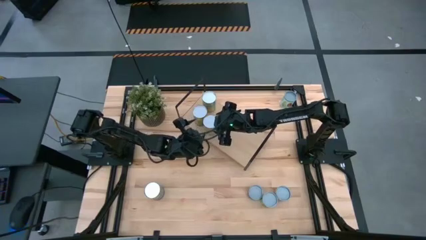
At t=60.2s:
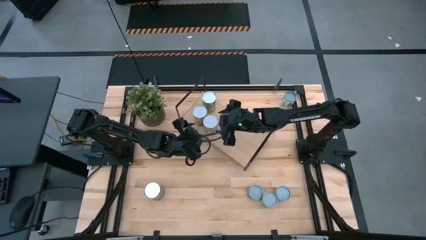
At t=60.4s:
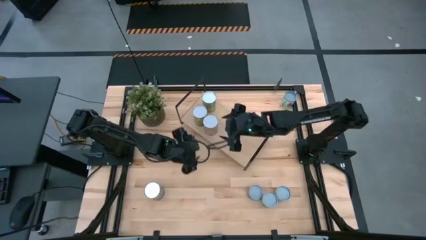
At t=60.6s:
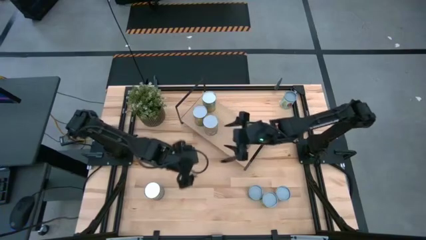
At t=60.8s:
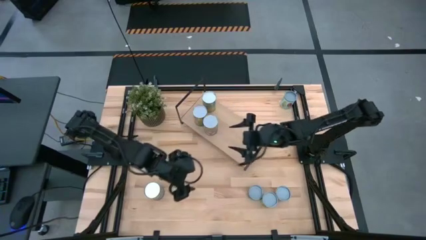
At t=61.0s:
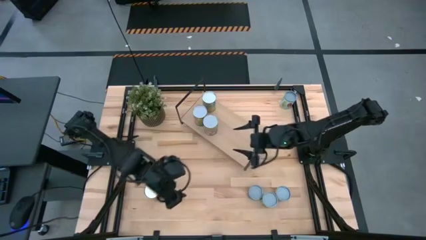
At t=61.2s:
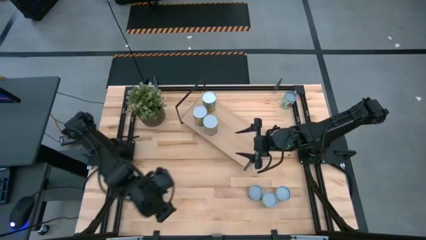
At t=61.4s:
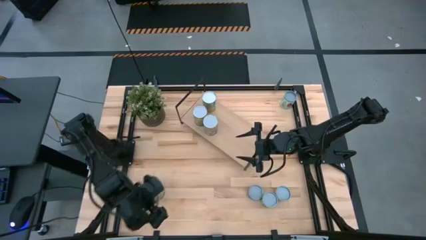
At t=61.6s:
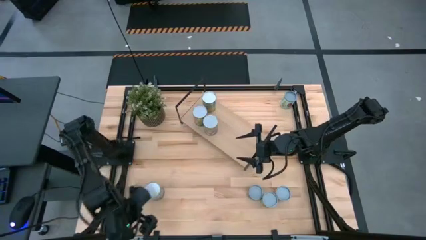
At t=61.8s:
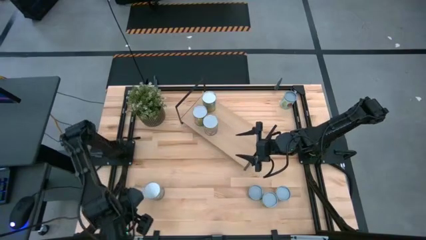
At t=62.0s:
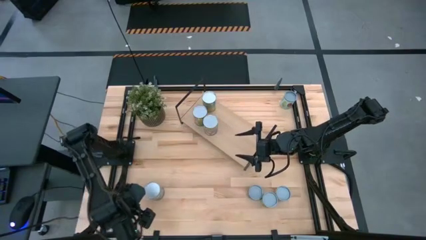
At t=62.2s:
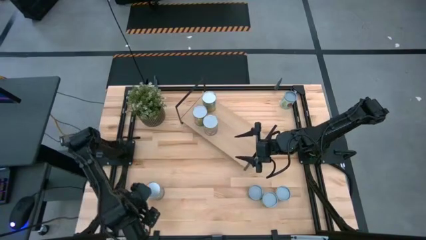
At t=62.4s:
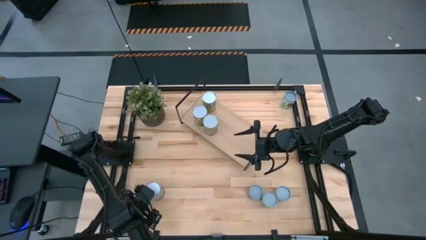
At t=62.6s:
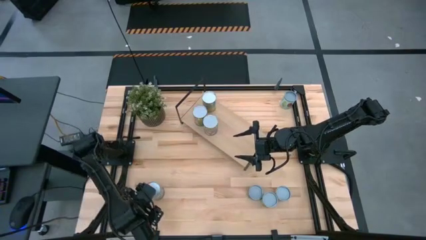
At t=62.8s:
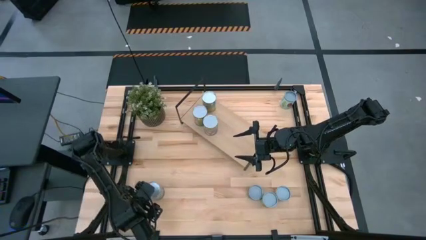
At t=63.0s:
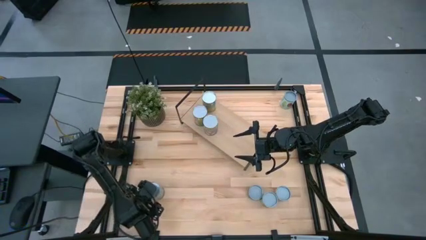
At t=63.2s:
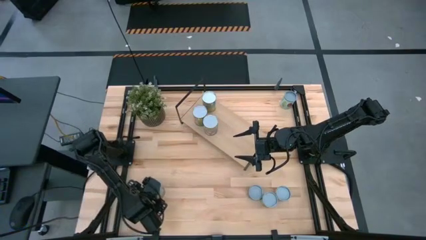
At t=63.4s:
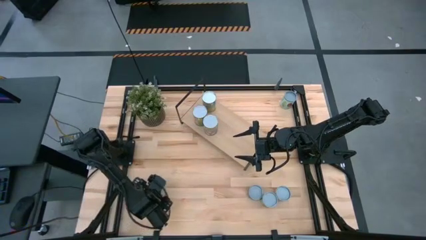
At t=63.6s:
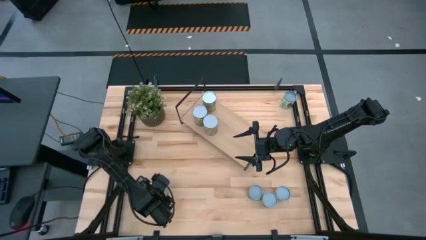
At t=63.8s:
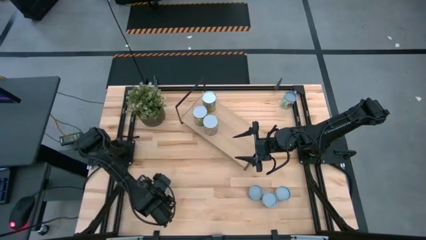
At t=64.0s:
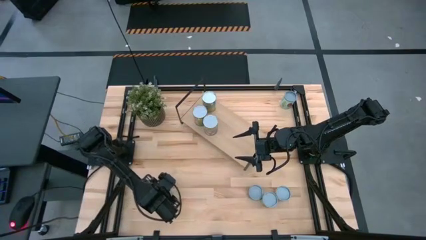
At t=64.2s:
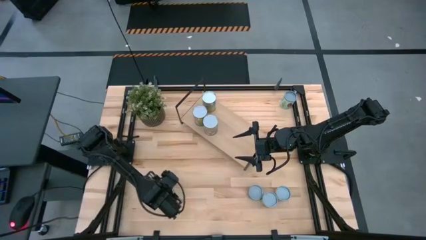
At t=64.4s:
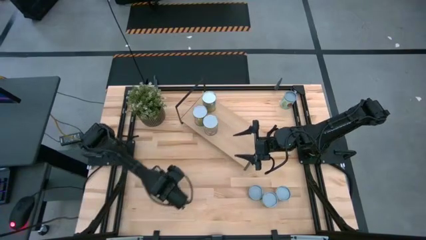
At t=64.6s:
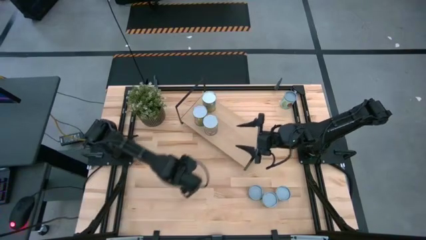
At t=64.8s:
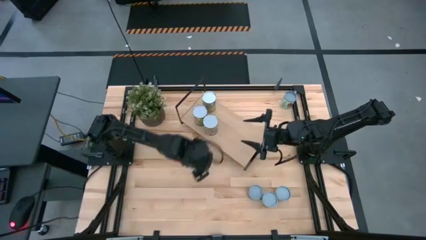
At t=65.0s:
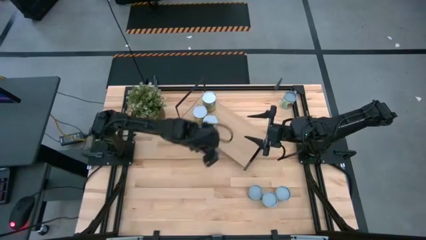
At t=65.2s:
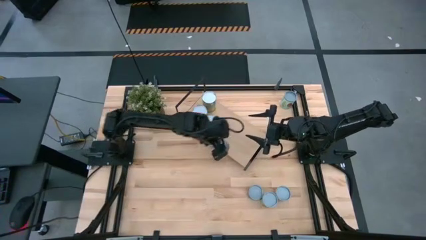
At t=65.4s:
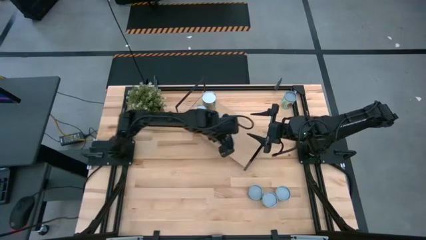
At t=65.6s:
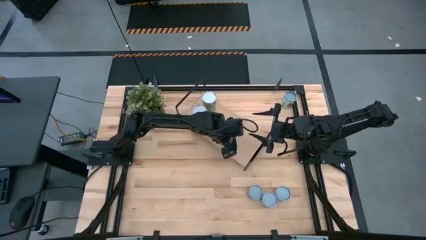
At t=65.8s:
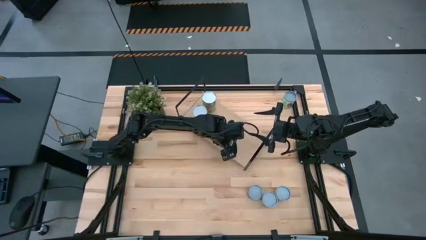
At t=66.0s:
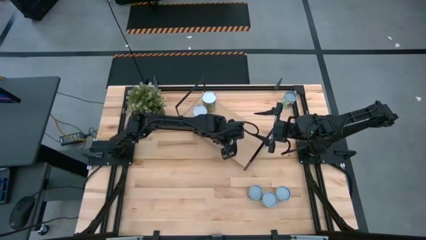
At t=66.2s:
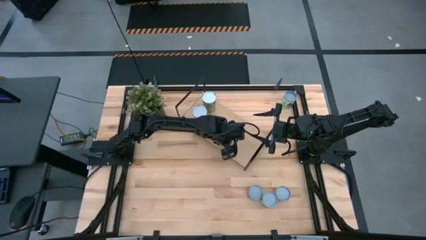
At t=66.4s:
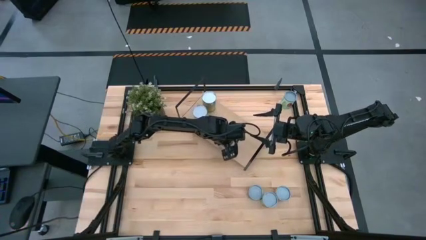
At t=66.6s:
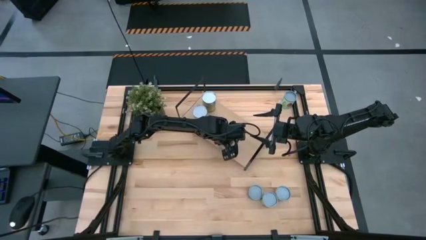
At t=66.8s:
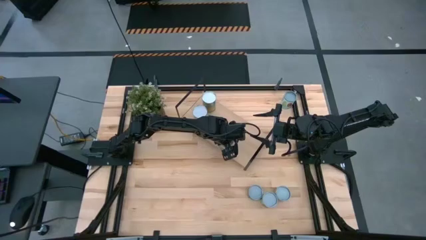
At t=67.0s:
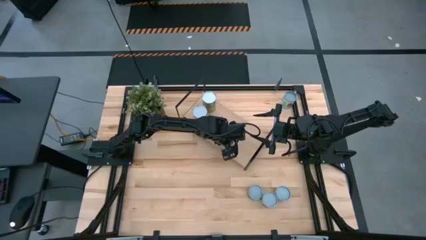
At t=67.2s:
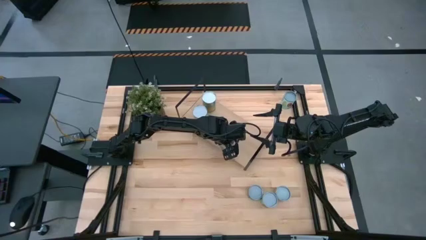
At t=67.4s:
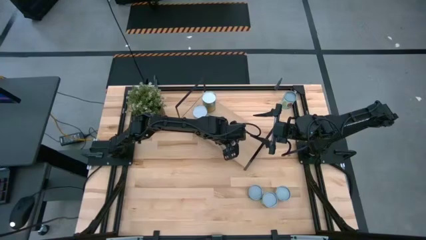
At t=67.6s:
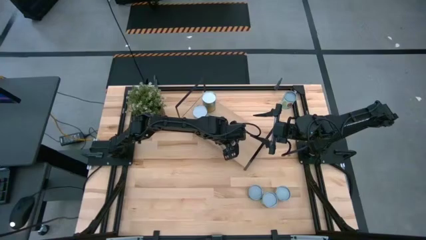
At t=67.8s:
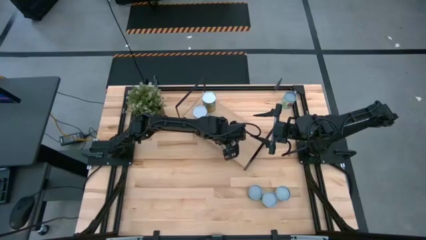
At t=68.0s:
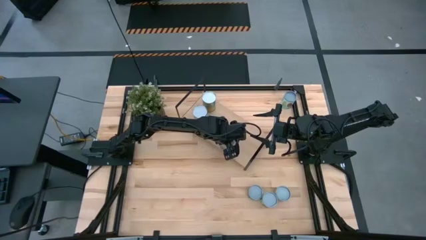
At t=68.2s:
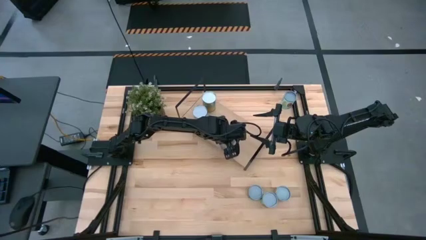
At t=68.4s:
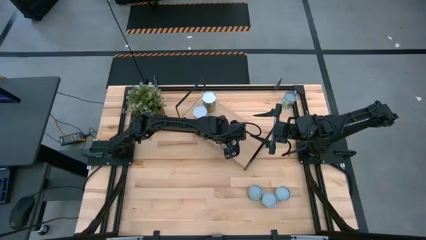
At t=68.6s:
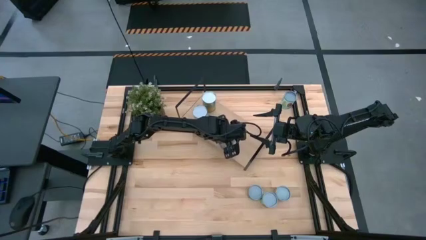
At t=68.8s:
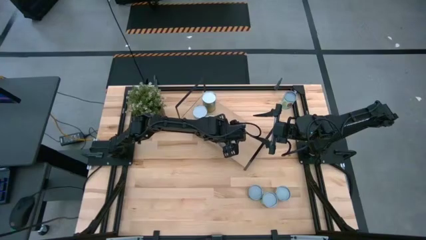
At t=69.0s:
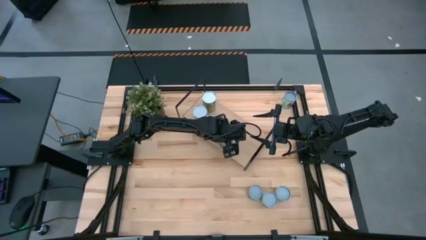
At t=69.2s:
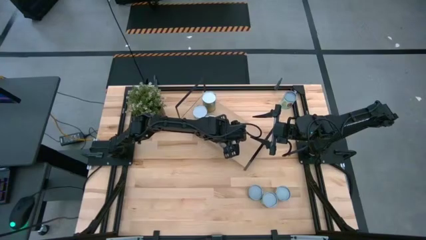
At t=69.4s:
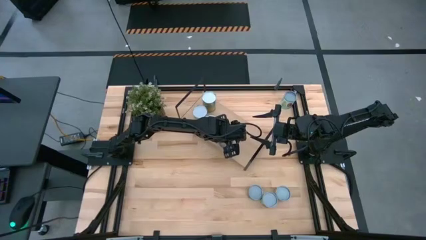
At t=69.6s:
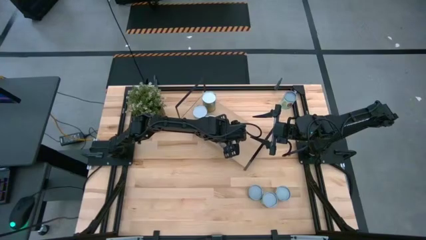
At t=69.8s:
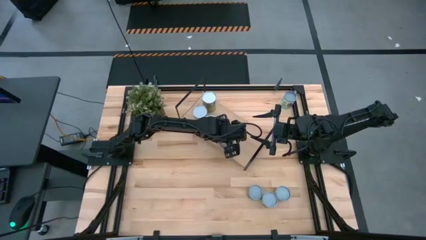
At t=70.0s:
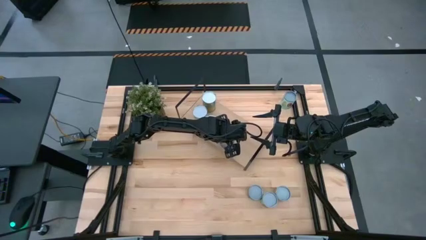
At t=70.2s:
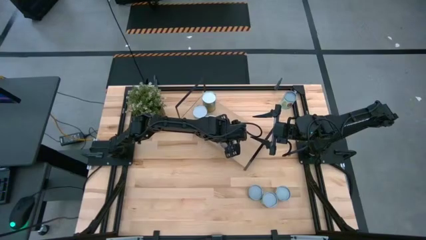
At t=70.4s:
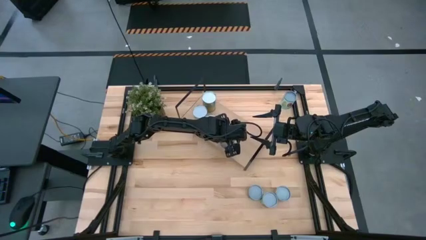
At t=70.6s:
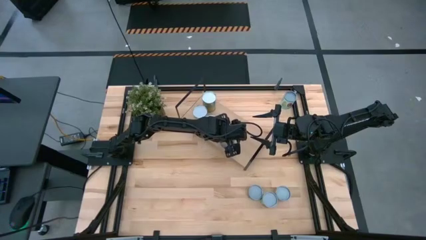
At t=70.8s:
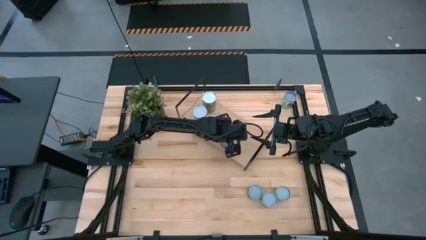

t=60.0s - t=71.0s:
Task: Pick and place cans onto a shelf
Put the canned peas on the shelf

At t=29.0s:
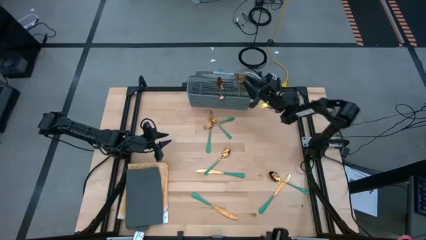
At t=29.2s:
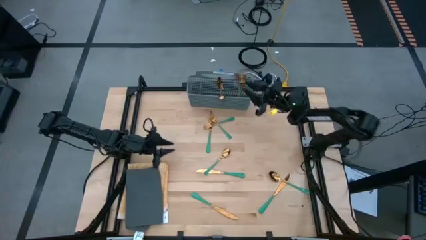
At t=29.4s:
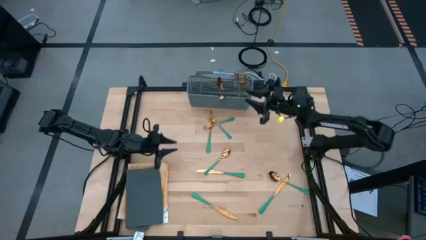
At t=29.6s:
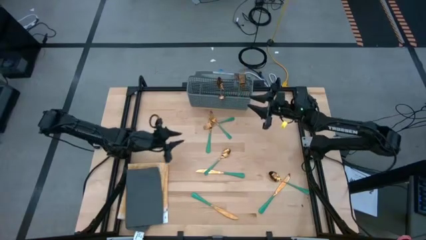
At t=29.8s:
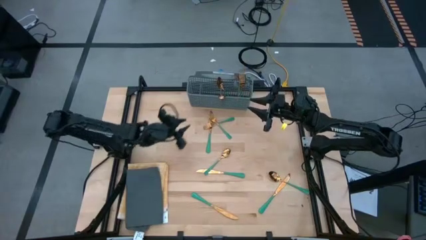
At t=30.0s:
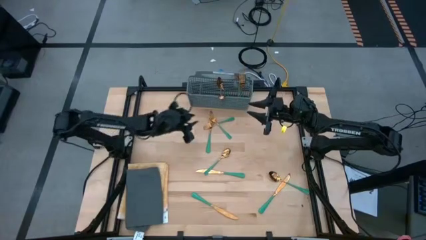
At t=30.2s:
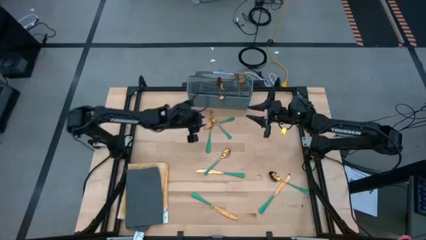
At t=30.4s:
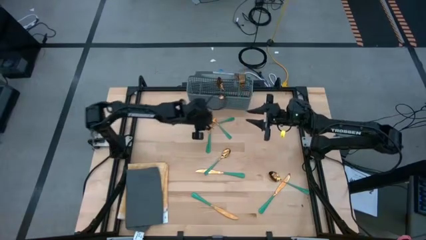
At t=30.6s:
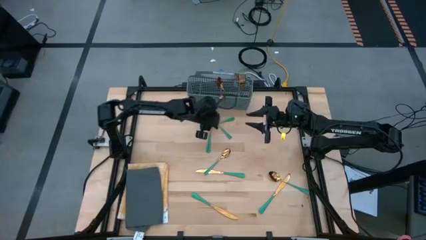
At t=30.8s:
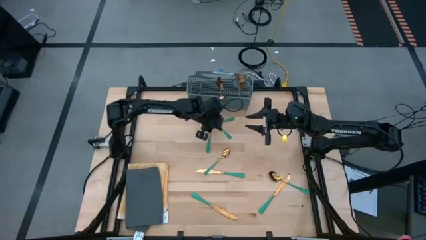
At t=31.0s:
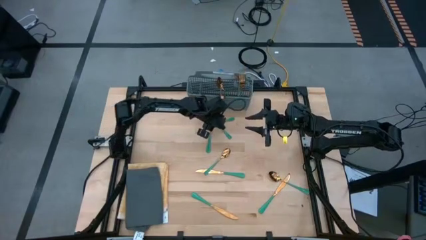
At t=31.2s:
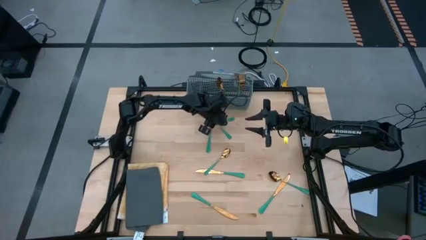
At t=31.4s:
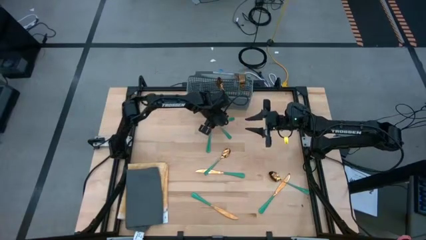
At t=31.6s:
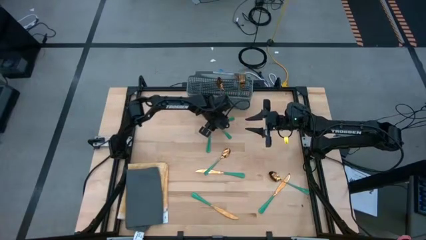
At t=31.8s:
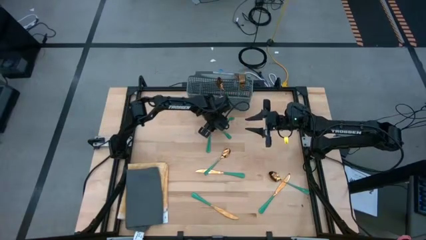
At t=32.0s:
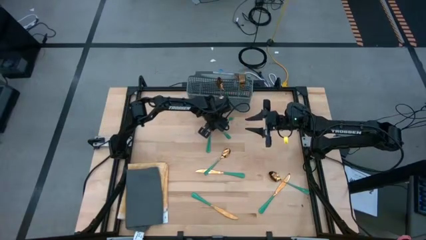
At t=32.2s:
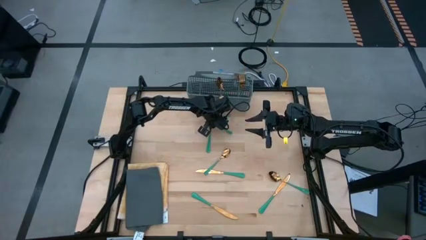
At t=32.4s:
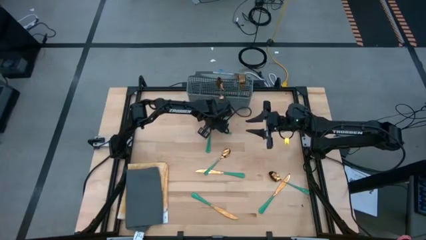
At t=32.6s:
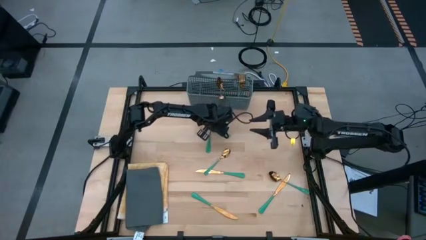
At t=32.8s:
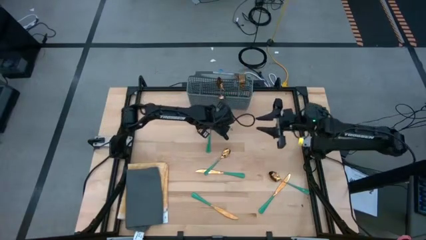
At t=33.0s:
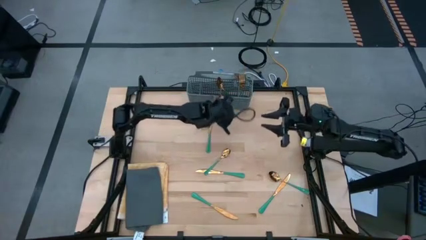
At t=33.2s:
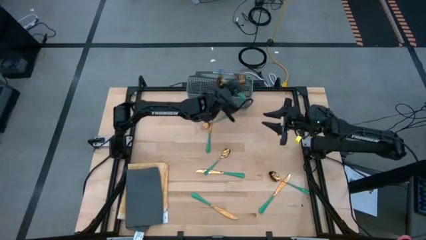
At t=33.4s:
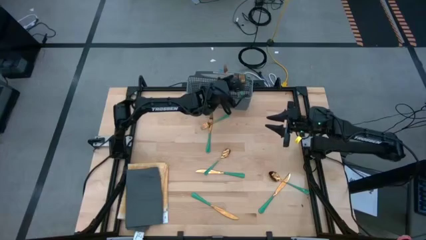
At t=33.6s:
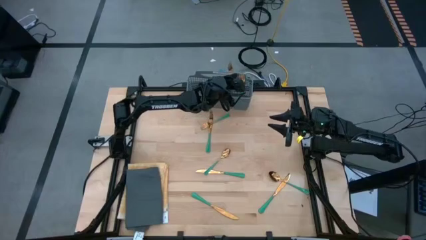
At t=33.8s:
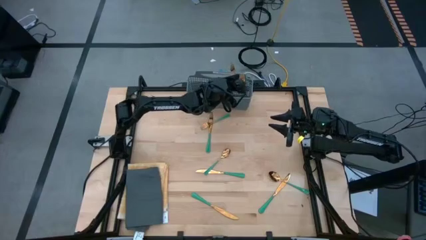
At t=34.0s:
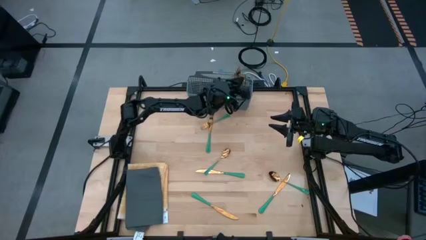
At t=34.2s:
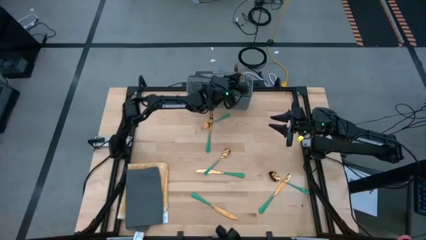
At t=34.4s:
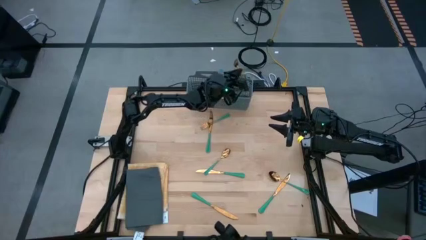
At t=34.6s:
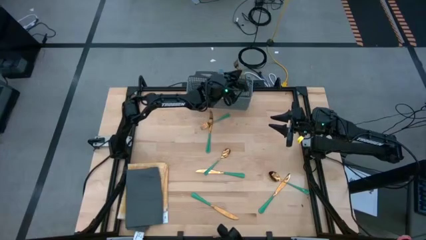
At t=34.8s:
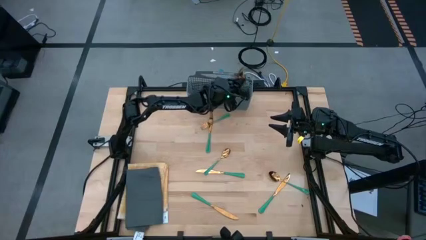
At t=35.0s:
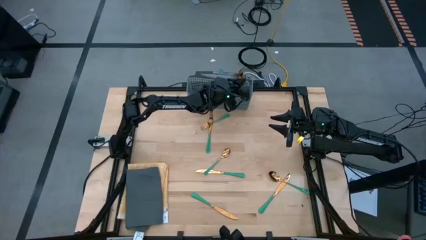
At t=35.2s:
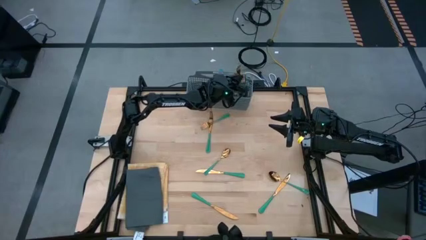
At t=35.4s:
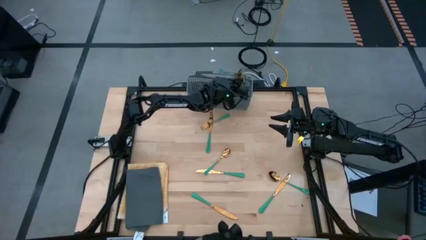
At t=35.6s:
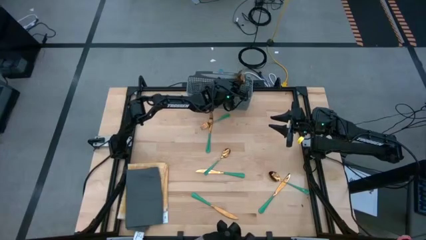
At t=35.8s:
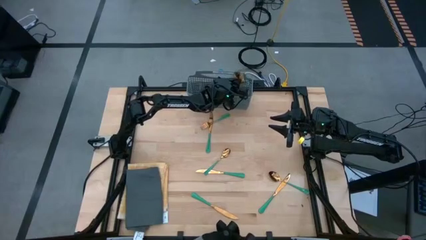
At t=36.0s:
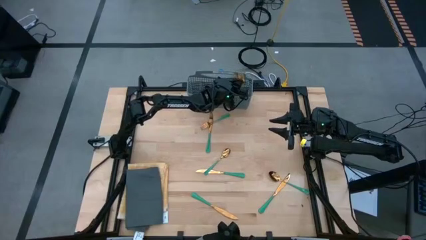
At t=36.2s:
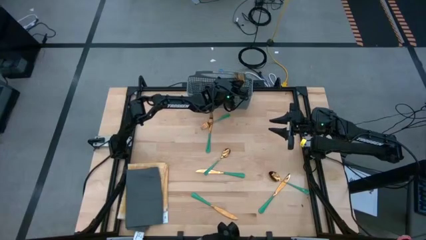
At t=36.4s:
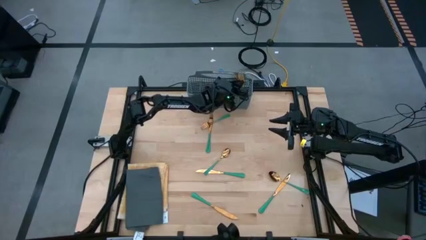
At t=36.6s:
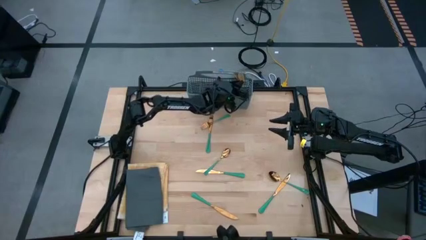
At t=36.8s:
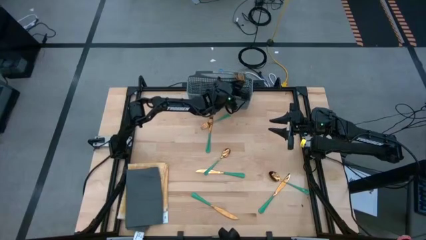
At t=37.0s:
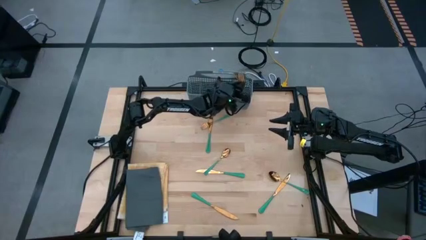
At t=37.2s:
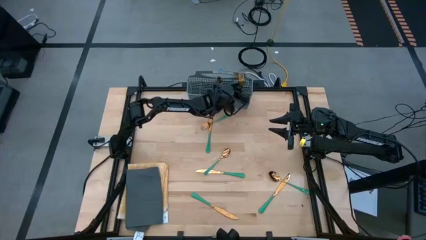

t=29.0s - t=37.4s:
Task: Sort silverware
Put the green fork into the gray silverware holder
